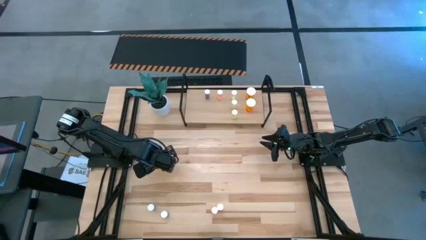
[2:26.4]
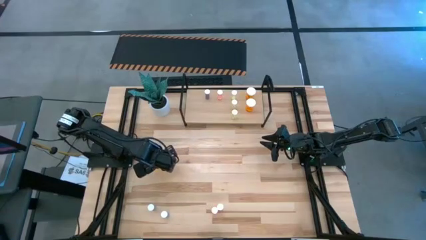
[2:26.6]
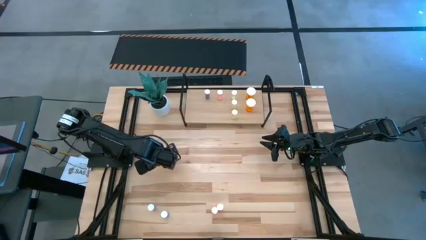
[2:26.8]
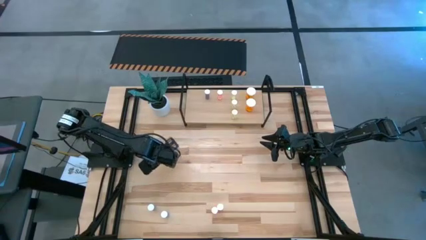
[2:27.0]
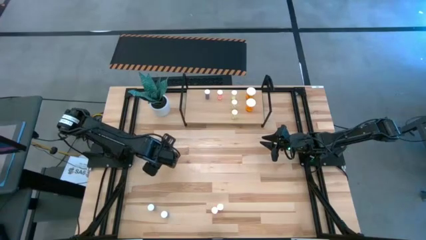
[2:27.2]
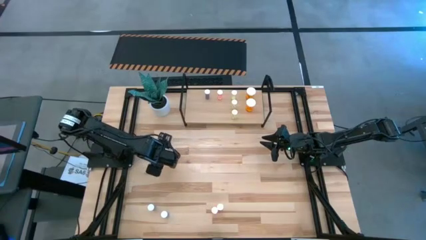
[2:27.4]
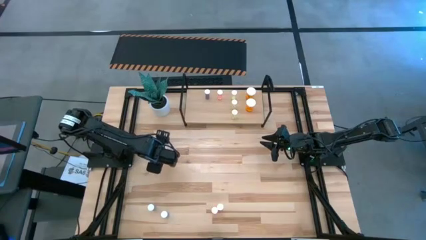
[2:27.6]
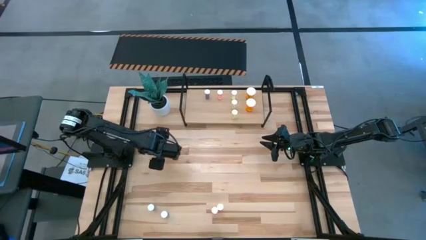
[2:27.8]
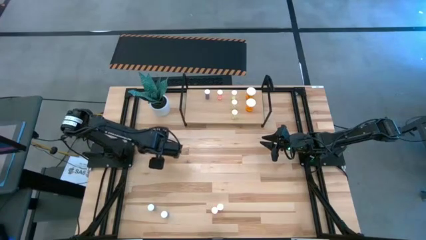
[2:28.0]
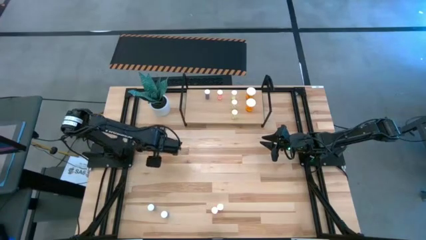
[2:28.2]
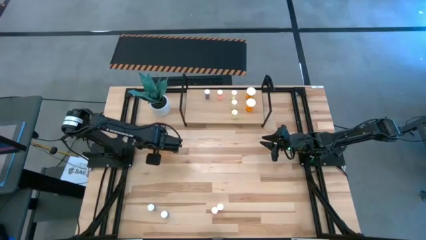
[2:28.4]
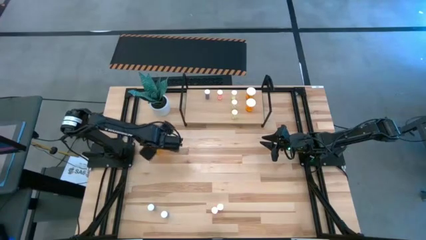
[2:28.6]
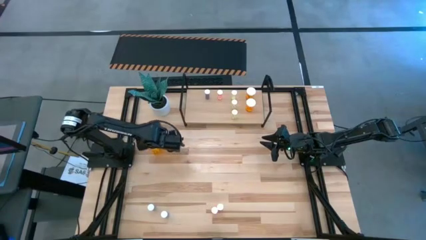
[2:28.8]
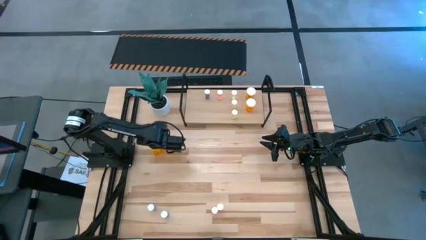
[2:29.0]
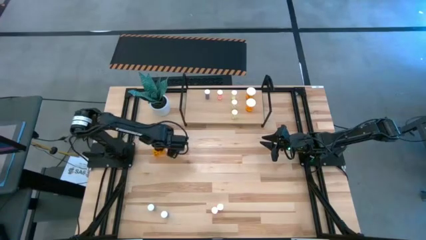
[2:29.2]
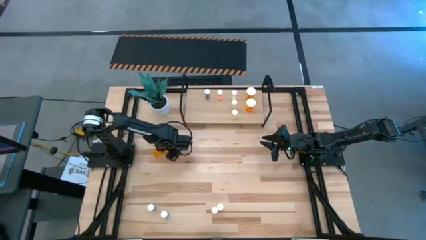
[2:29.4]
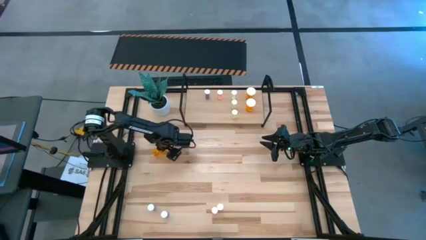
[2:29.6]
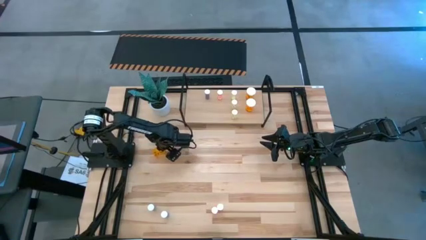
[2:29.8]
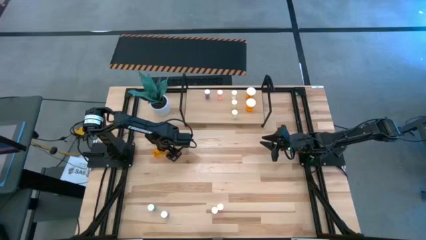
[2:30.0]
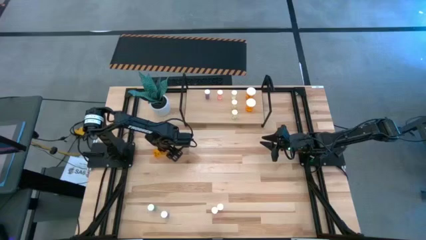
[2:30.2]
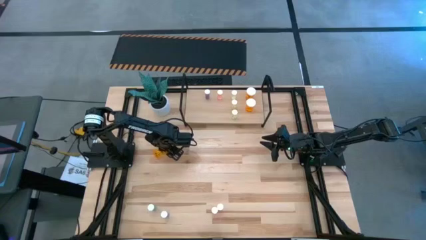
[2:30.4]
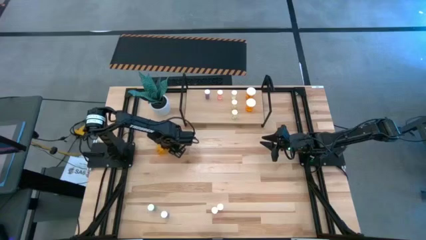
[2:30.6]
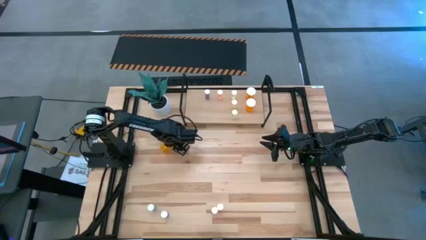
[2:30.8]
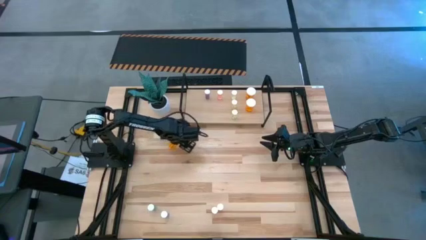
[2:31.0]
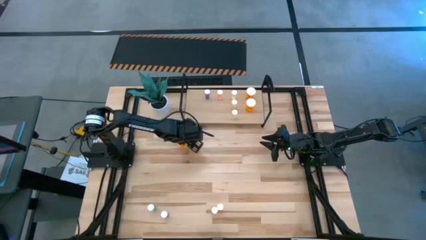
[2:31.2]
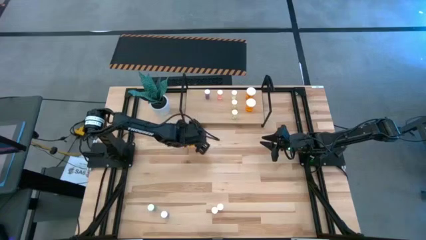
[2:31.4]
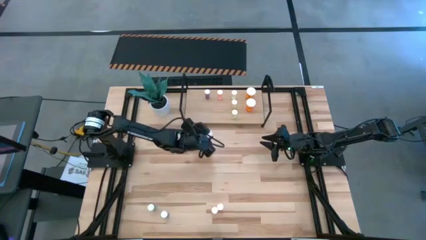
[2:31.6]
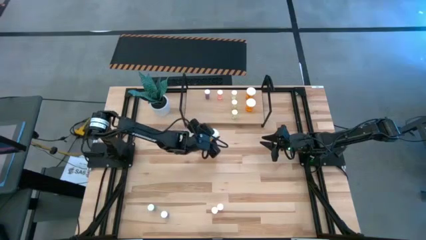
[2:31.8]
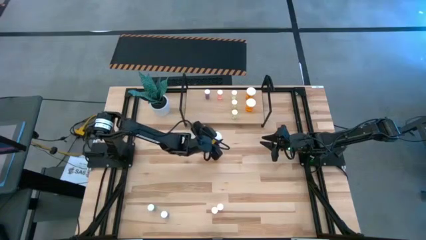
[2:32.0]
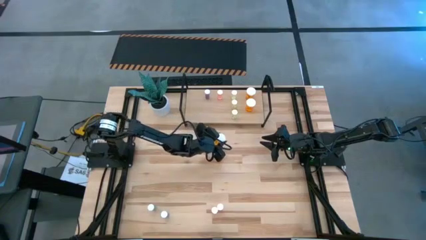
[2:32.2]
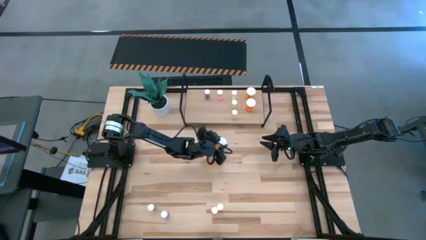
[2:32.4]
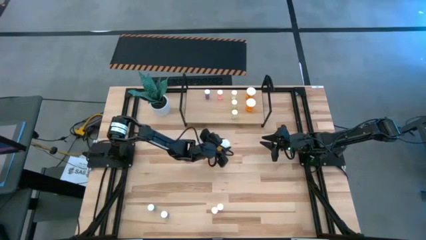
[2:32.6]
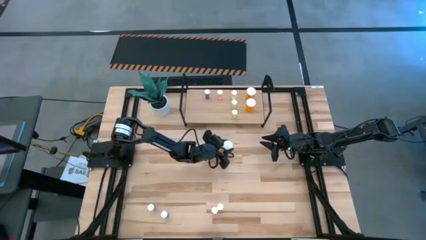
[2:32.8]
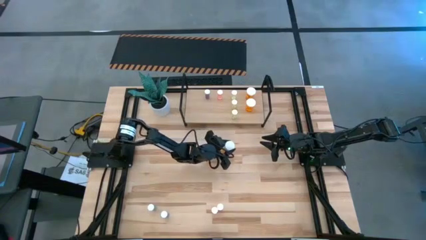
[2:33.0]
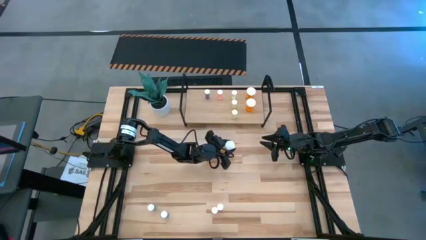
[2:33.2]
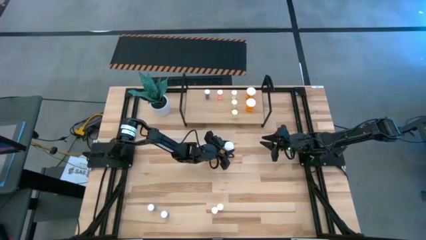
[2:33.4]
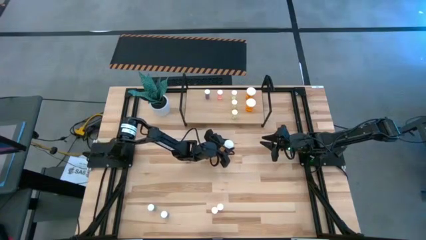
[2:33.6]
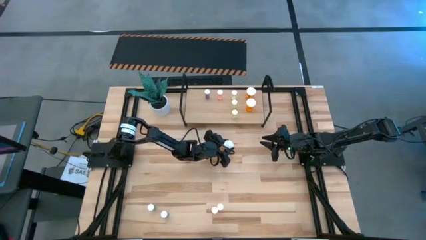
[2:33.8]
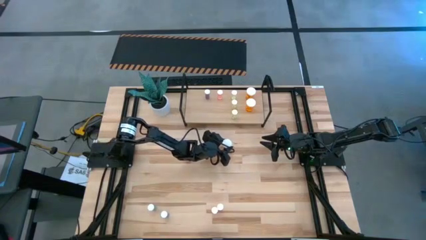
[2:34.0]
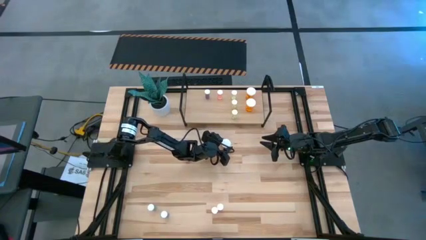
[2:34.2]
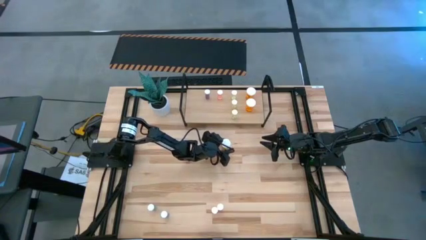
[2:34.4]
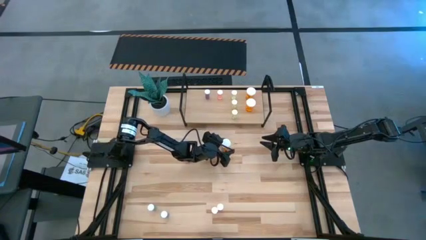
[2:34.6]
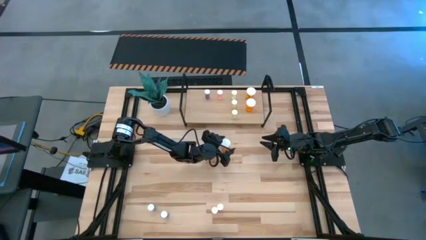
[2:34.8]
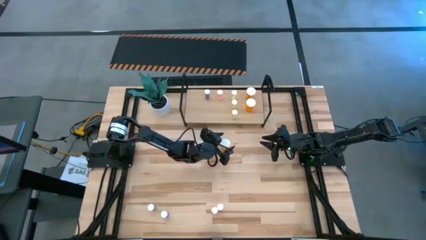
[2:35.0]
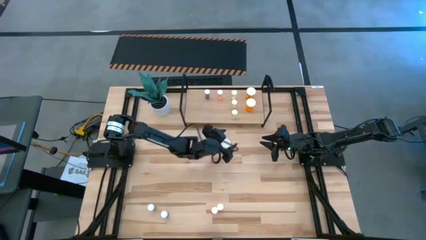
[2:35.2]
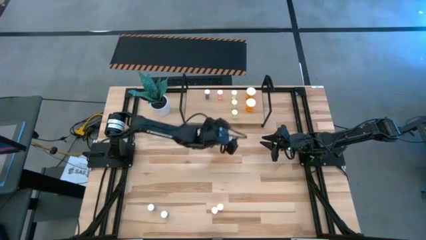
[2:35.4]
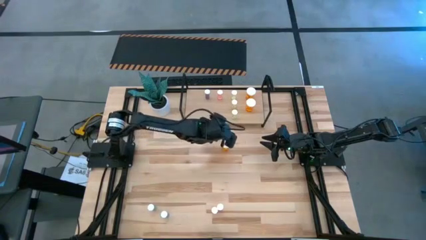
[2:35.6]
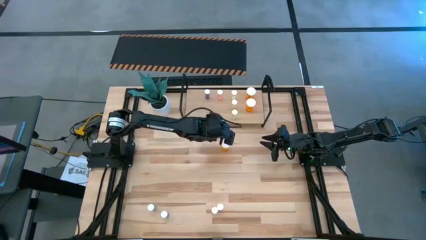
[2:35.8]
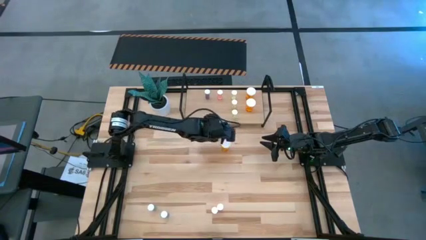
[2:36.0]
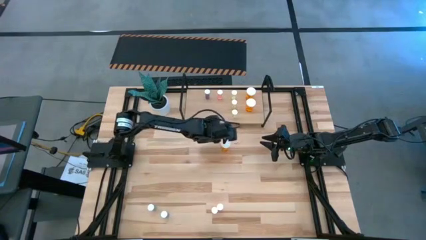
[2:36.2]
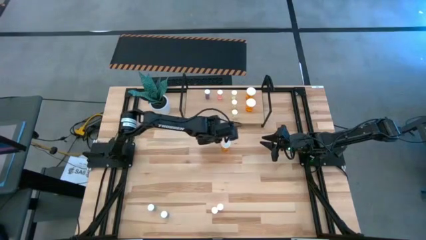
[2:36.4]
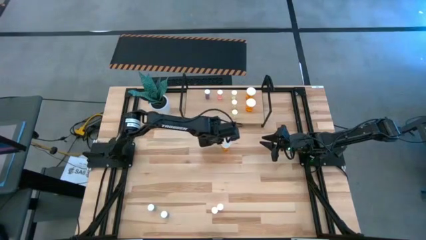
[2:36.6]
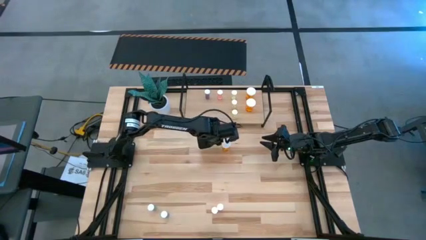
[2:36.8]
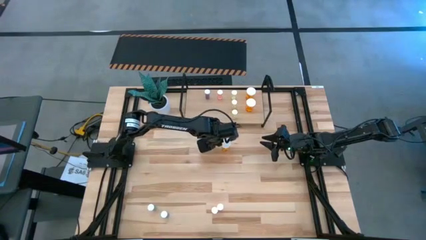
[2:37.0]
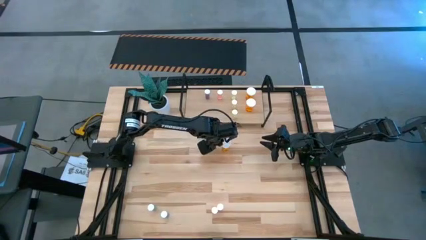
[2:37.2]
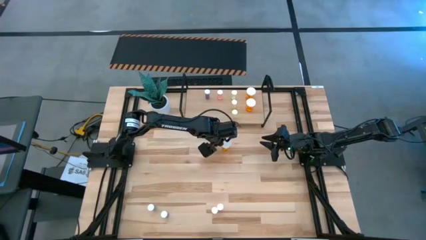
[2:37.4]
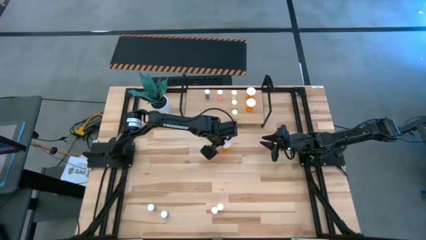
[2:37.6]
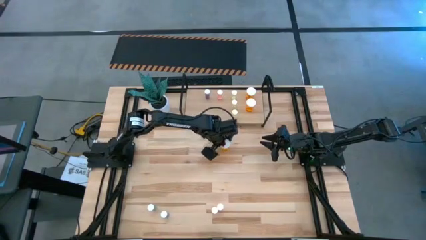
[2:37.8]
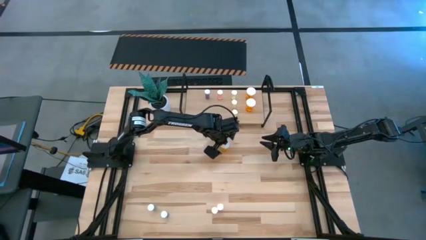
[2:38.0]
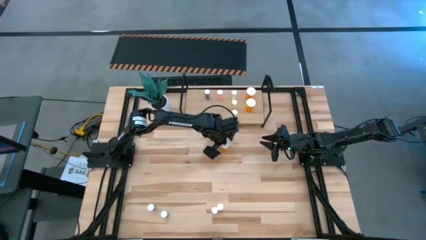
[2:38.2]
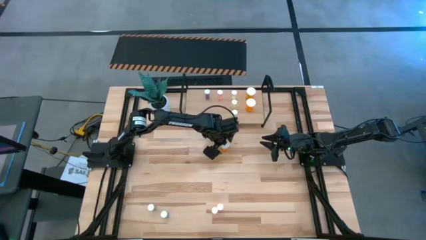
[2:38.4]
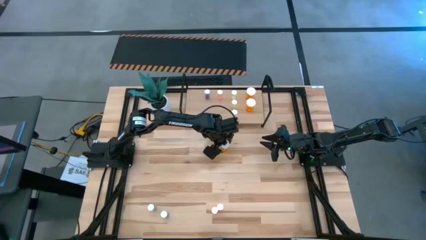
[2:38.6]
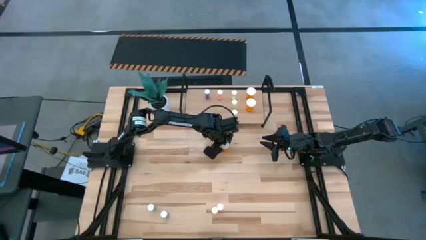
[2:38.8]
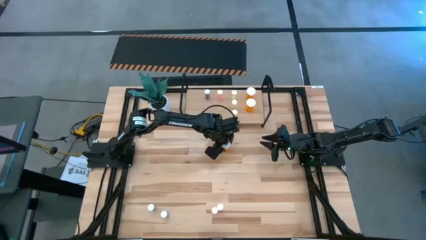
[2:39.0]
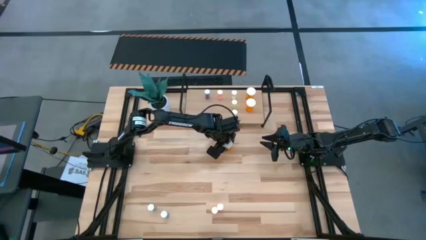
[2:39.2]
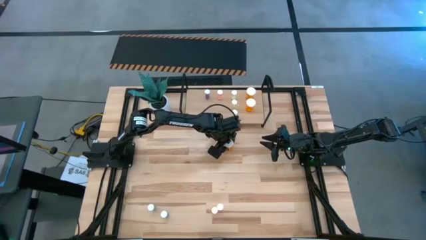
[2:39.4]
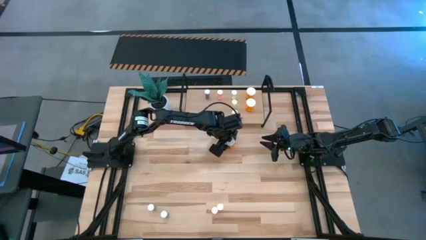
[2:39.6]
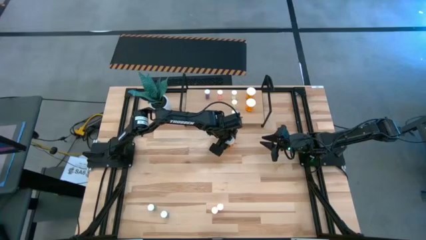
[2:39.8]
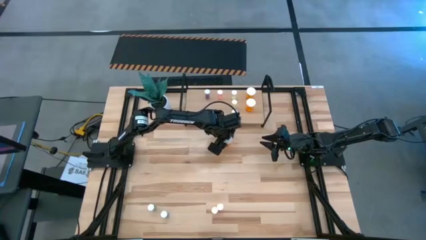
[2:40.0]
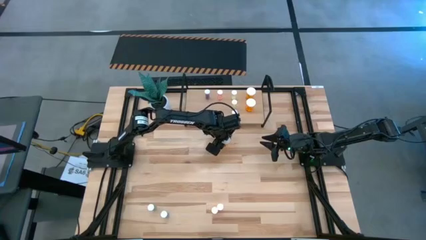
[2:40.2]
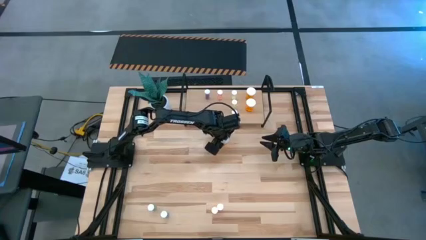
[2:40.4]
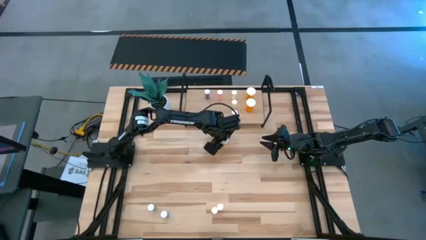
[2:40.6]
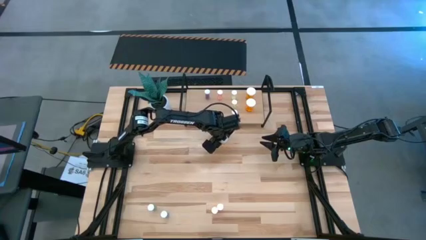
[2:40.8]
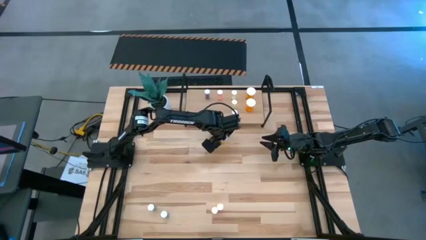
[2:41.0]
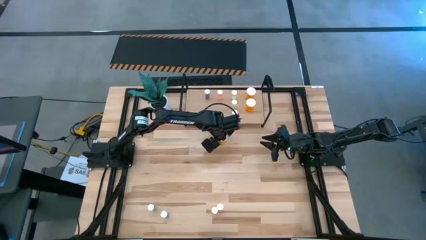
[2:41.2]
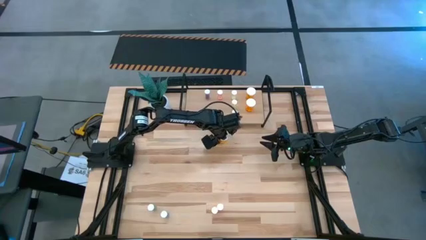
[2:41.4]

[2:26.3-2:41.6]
Task: Pick and place medicine bottles onto shelf by color
Move the orange pill bottle to the top of the table

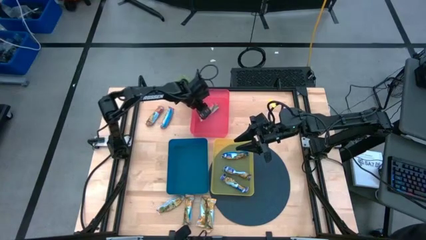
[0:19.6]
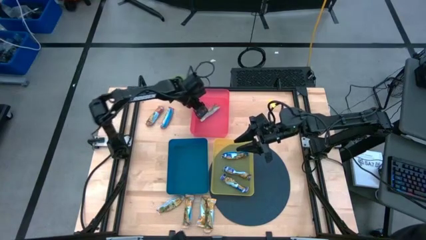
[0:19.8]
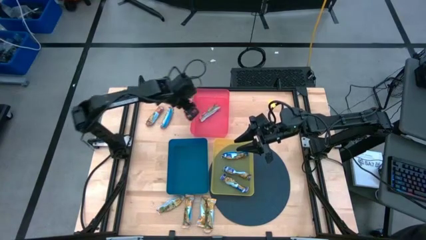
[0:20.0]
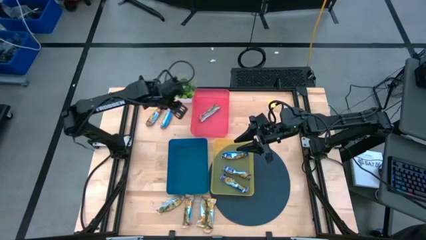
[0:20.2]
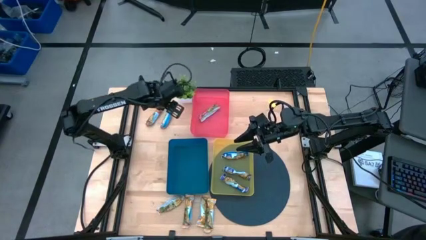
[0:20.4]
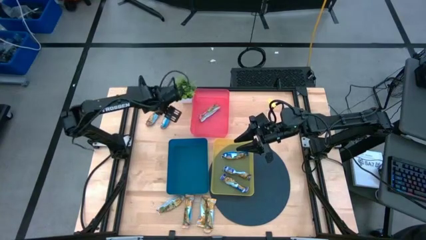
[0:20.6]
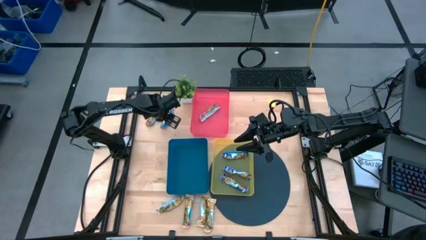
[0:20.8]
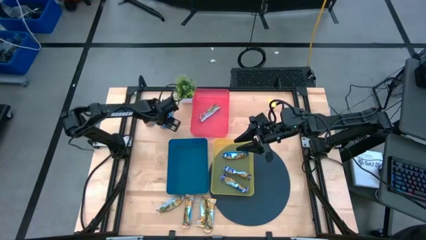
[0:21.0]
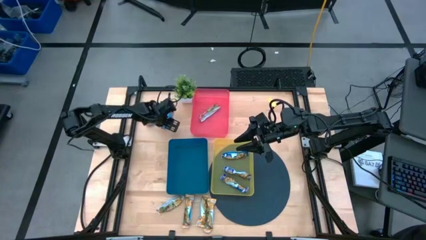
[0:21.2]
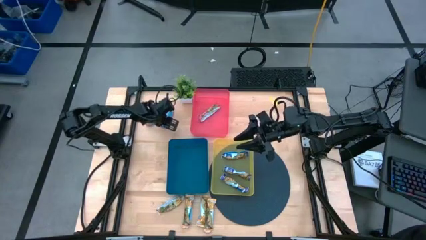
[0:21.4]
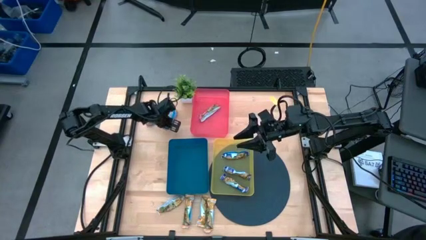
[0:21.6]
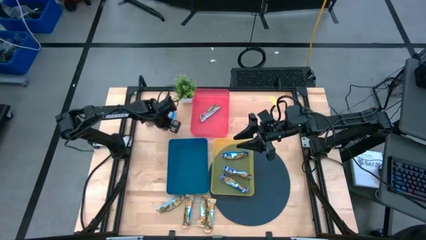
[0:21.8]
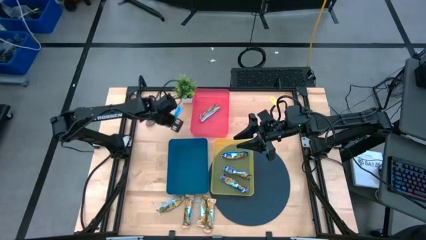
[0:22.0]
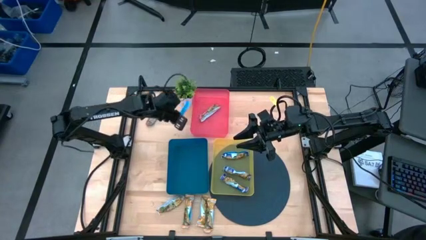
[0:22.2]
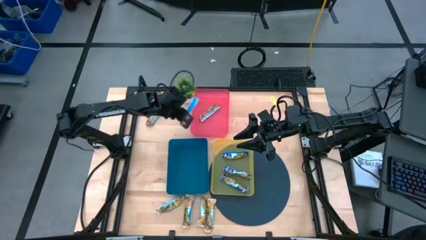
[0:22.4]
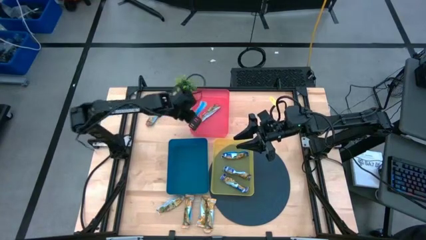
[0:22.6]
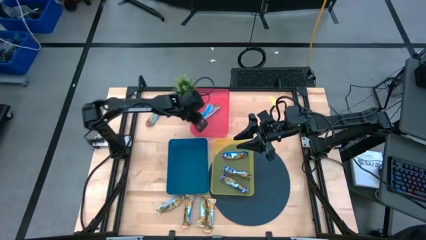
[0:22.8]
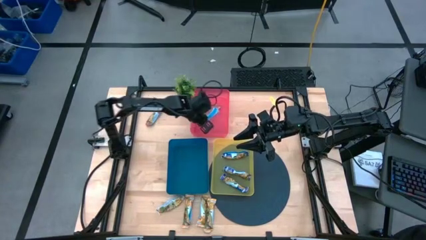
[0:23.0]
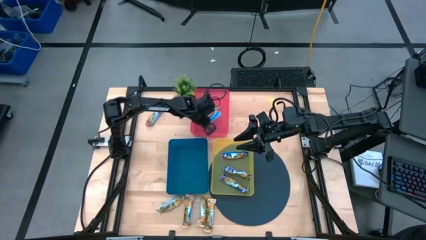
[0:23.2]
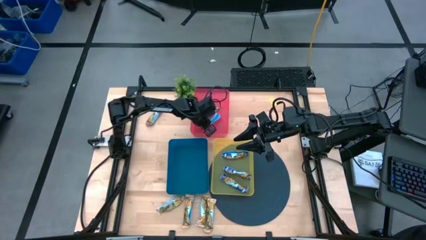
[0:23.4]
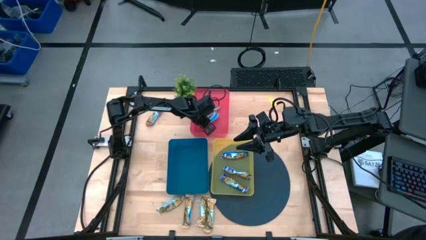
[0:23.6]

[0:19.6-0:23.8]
Task: Pick and place Granola Bars by type
Put the right red granola bar into the red bin
